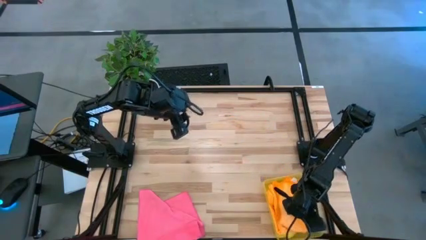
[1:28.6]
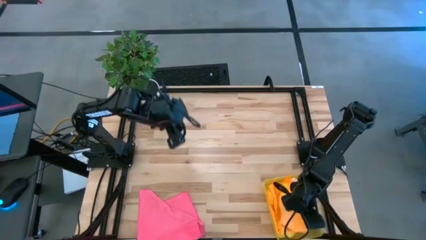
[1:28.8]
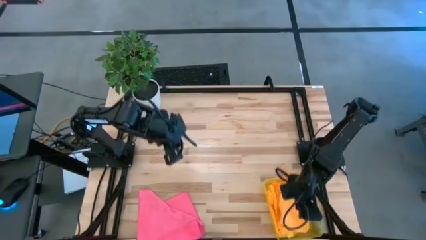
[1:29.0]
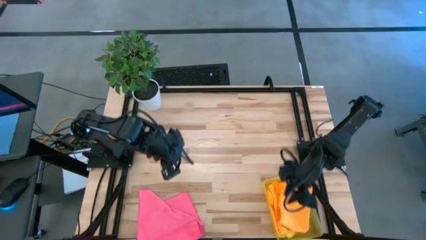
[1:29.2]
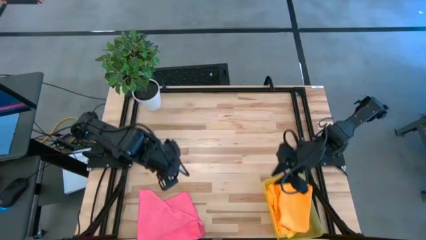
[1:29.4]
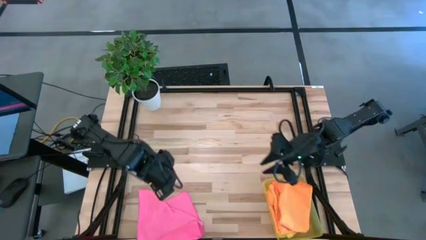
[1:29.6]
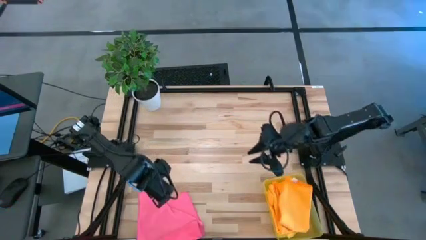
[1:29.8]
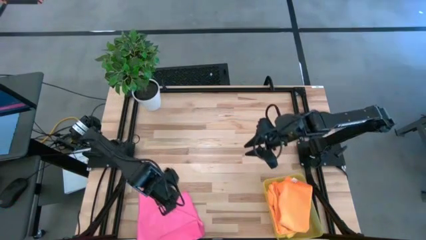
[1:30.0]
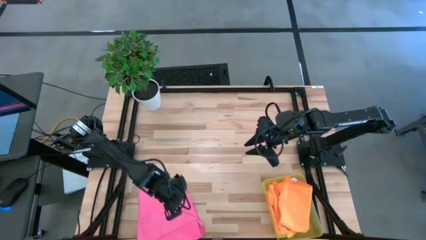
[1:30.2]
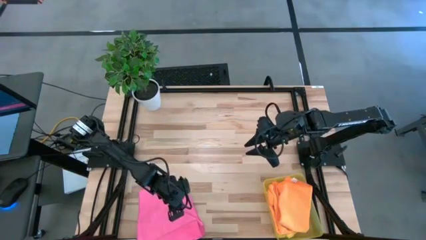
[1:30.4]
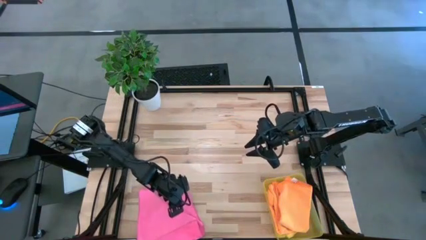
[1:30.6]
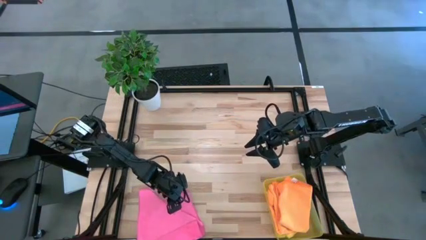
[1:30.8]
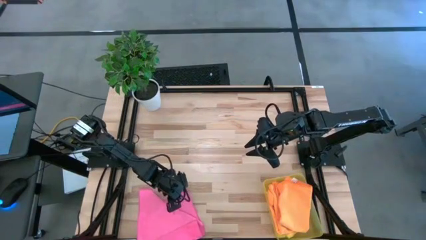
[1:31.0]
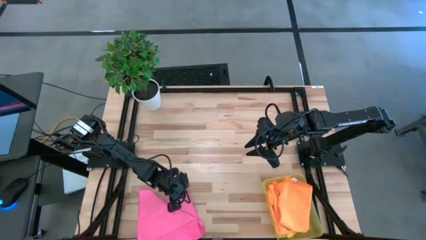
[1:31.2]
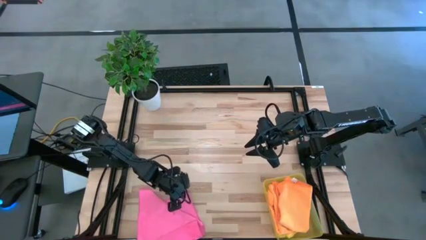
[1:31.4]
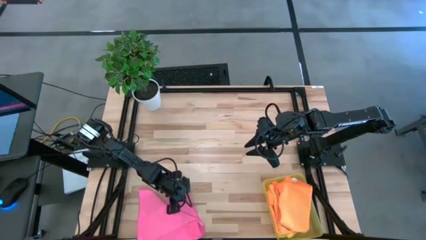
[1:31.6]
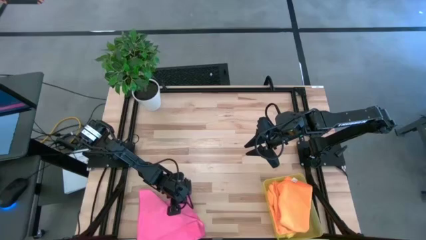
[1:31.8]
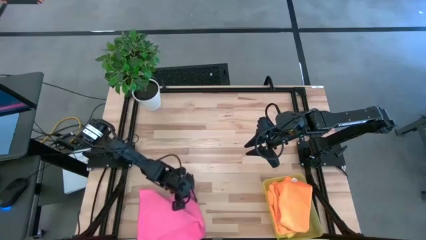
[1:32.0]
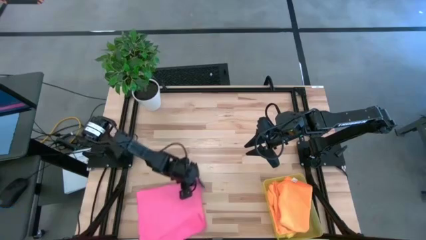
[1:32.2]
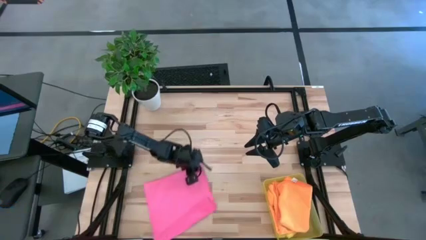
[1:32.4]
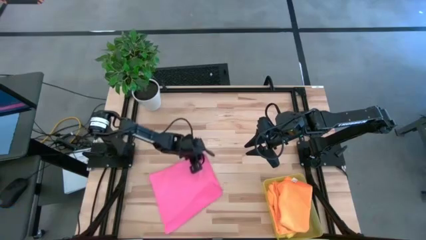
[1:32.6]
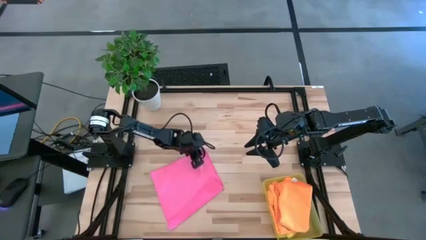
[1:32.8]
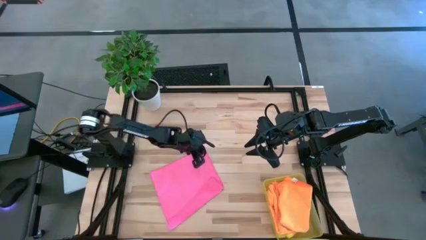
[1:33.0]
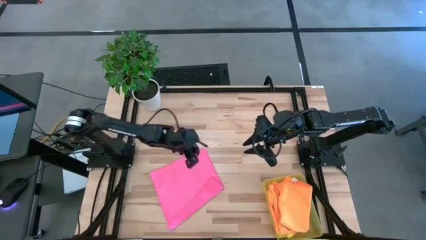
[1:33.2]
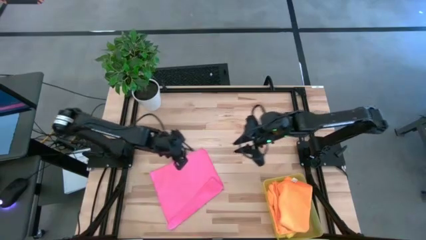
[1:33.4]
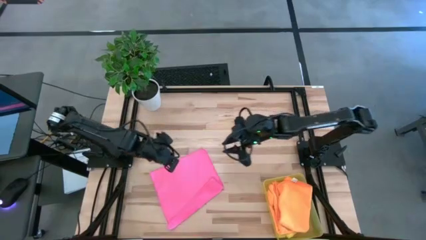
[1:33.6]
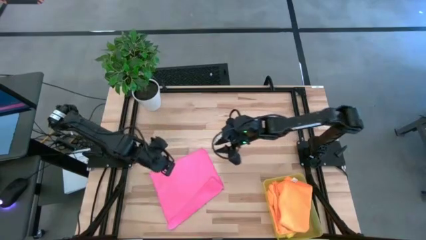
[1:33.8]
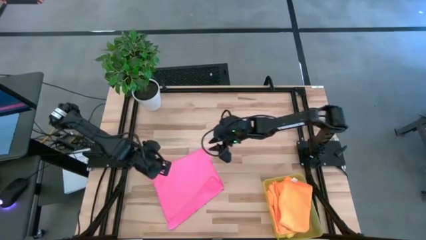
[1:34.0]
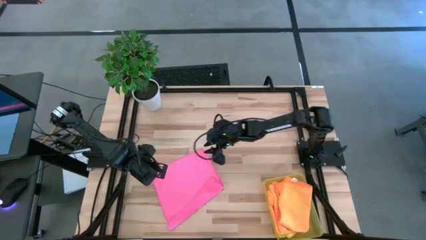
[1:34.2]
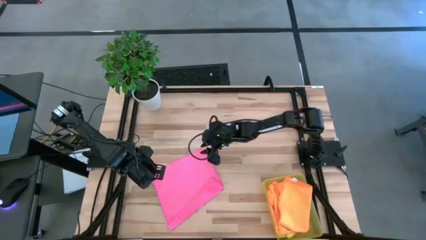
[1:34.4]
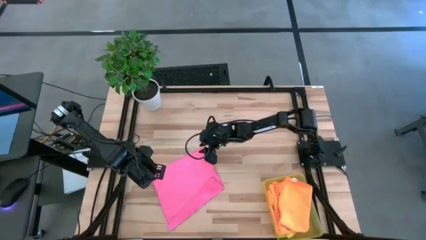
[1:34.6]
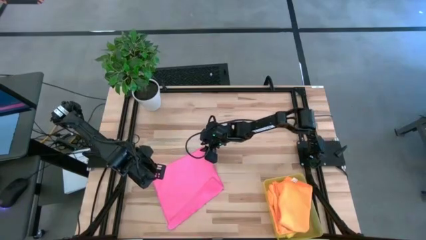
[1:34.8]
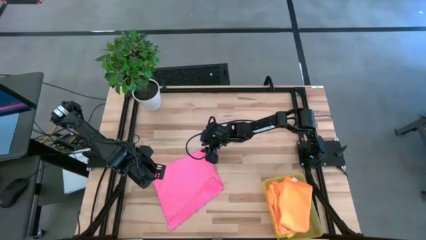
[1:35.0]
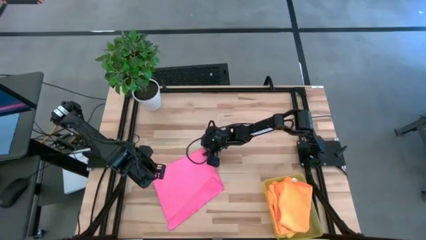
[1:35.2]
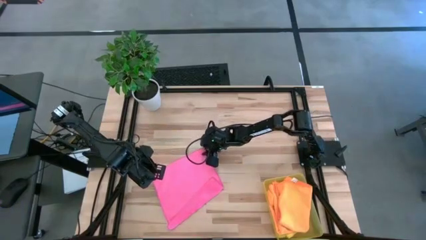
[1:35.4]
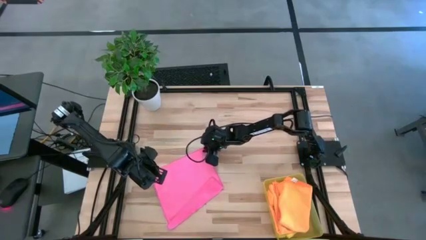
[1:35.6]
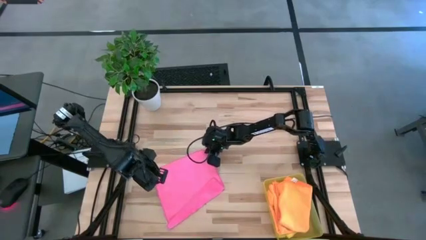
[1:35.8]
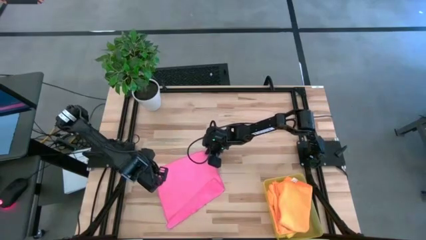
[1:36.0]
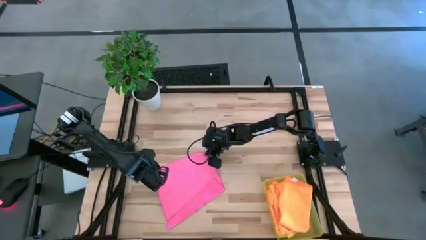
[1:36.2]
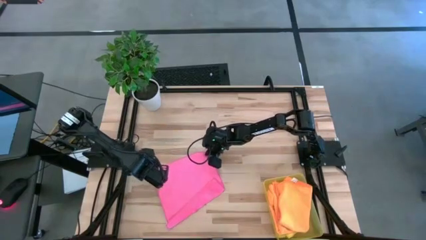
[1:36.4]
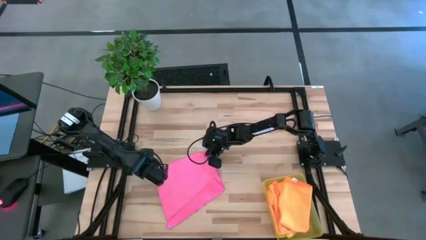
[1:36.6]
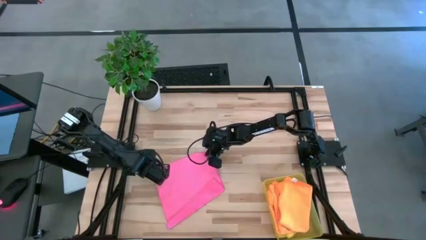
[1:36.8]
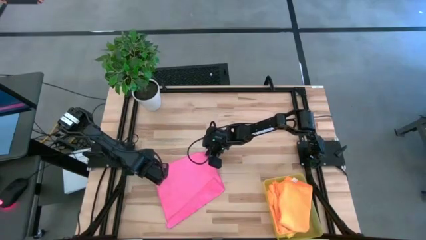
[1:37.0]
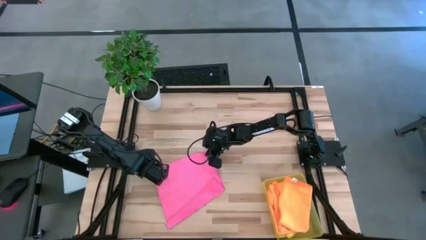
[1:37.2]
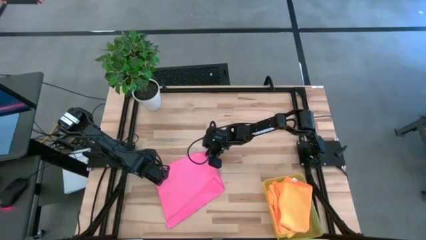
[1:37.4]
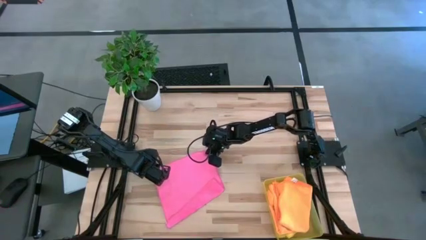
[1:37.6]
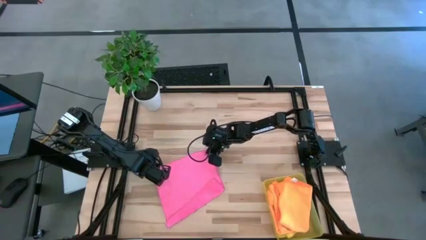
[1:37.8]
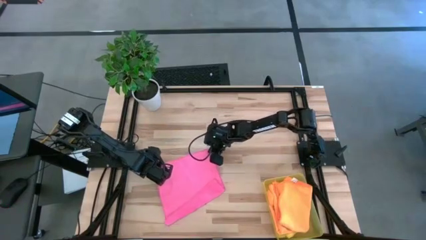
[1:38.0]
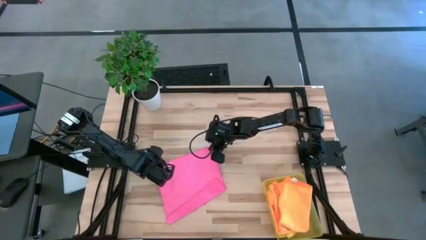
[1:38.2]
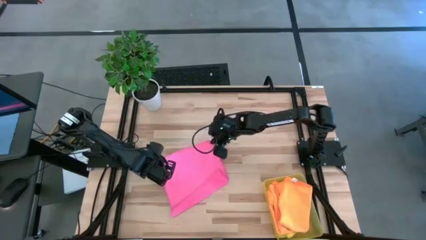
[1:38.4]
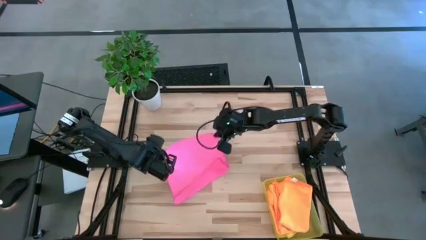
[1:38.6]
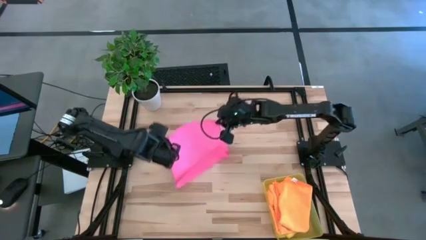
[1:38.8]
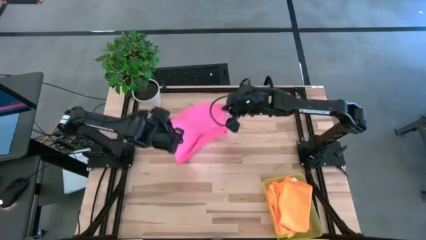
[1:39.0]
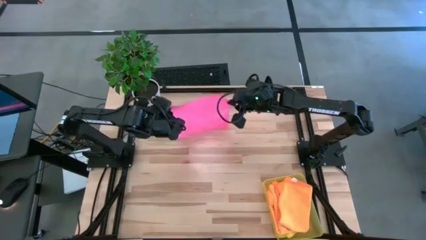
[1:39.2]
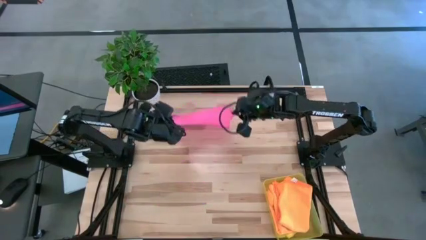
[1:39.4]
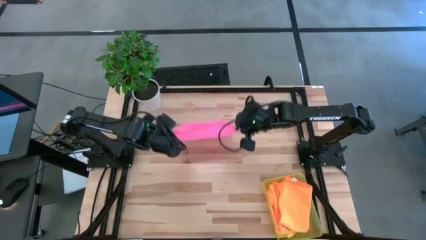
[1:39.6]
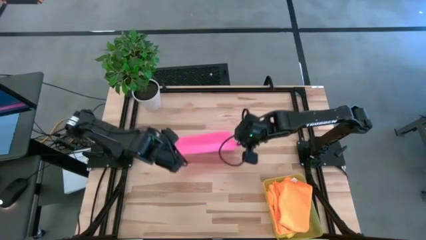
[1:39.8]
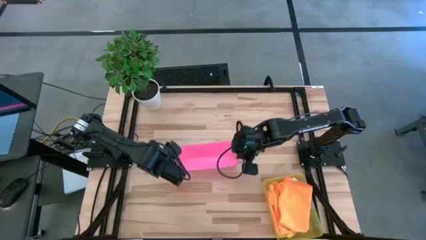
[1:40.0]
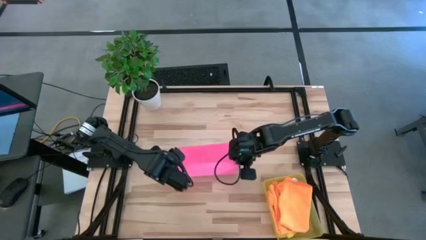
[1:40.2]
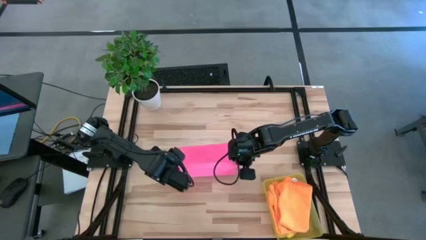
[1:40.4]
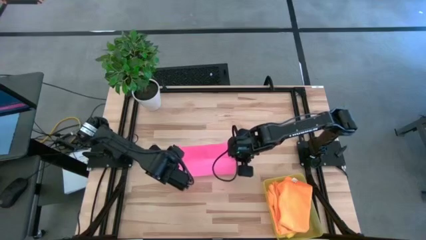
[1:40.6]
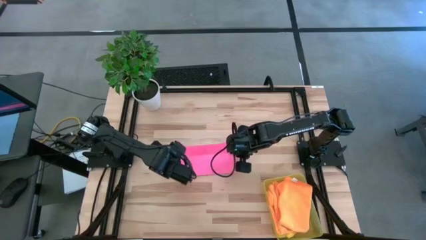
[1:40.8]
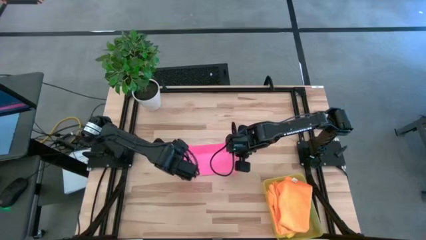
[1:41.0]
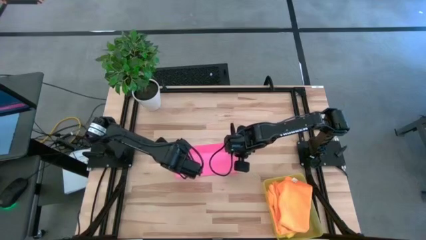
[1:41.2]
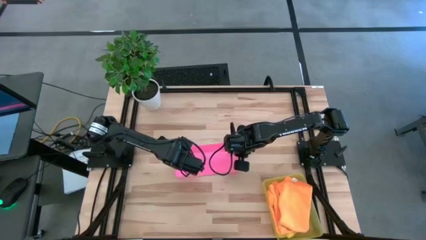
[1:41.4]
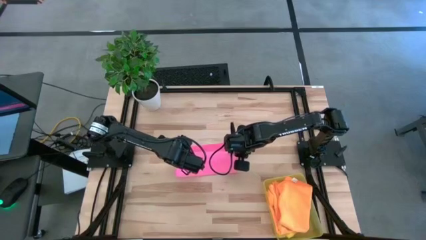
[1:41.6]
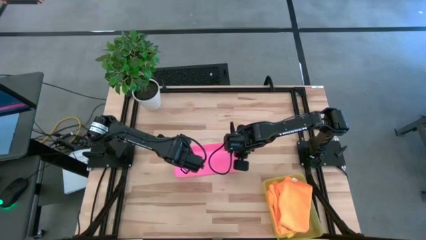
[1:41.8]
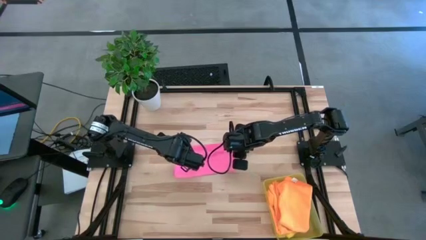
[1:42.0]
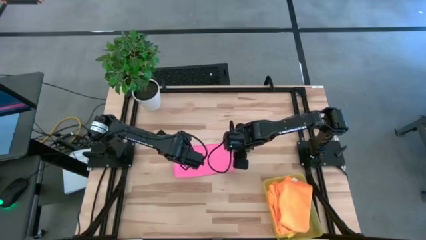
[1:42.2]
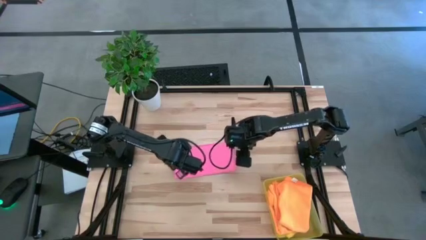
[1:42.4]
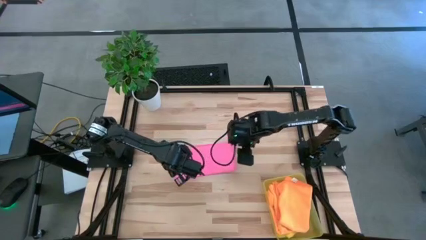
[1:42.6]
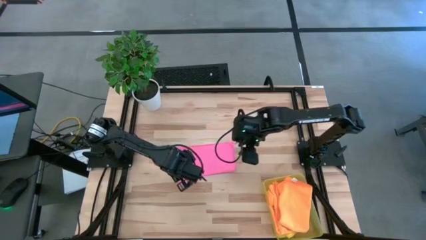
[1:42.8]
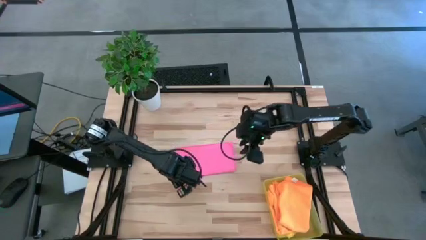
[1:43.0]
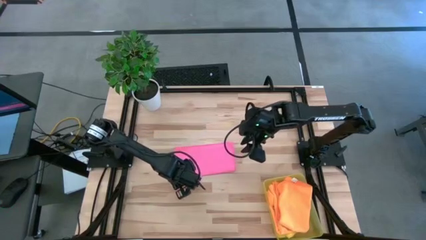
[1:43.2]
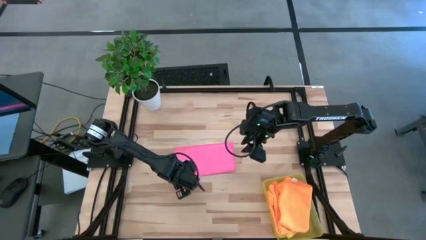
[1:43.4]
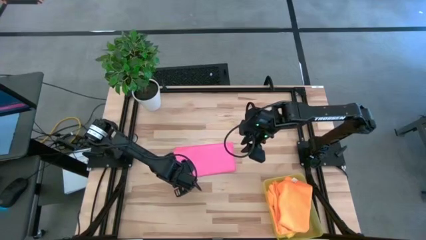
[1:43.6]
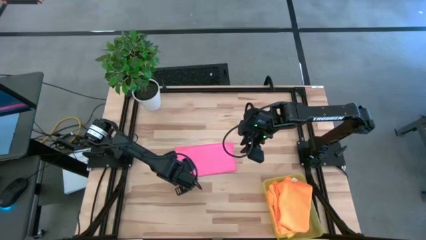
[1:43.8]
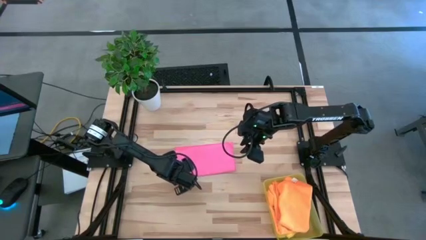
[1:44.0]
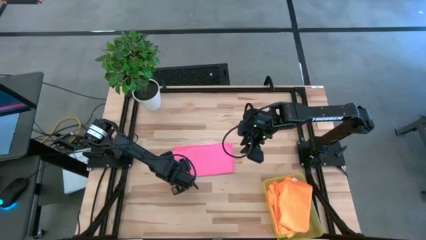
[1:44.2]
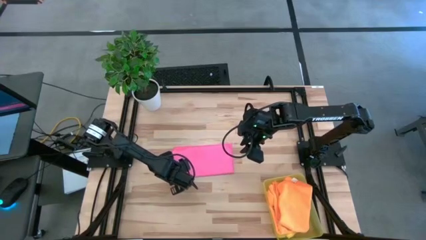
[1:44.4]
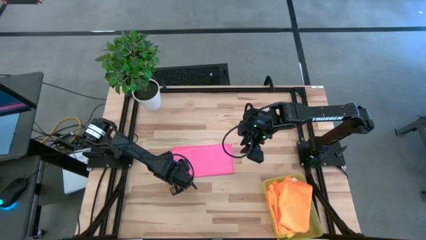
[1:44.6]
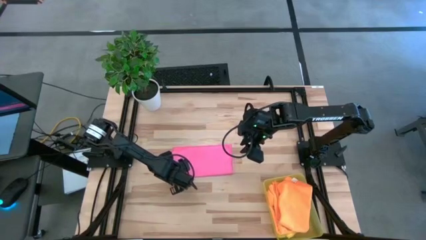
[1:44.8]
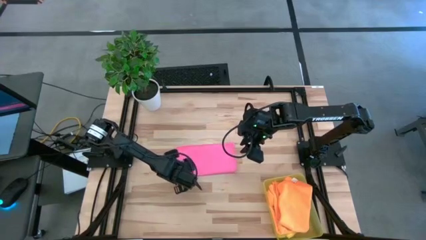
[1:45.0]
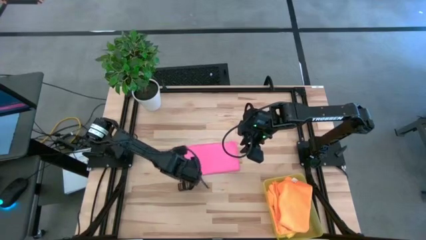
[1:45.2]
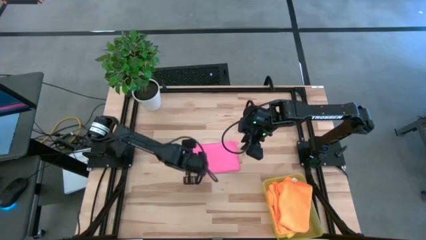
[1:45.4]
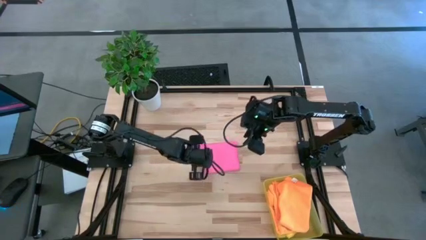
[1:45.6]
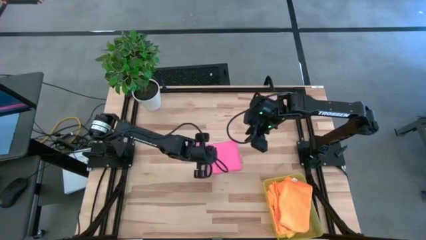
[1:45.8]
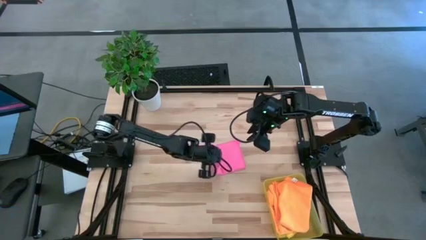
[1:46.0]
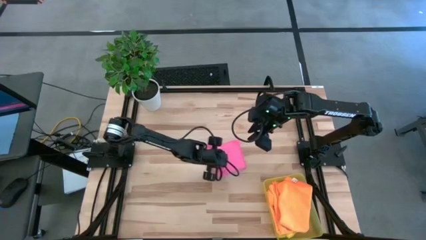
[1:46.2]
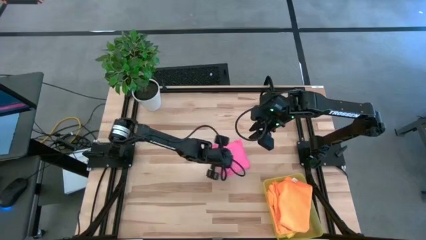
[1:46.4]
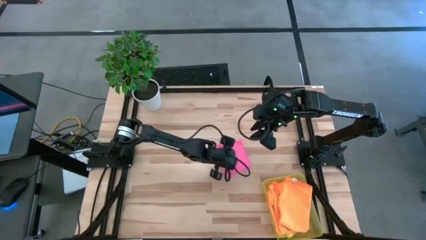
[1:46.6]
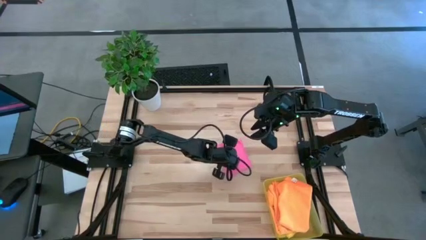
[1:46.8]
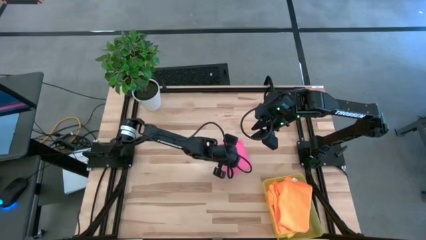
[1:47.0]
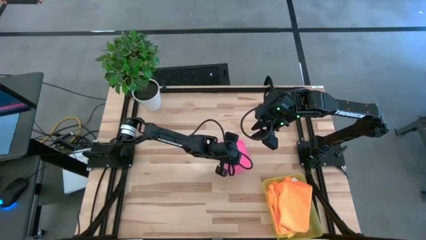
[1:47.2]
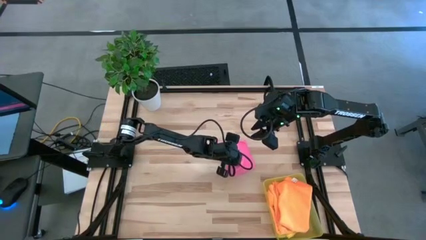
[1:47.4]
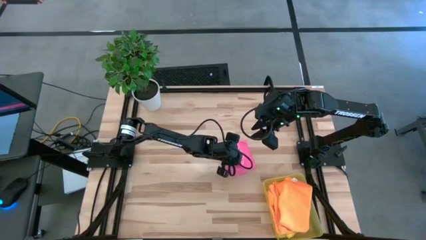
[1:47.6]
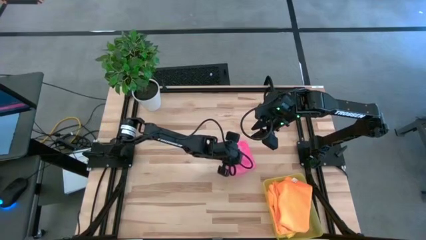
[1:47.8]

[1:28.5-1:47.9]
Task: Fold microfiber towels
Fold the pink cloth
